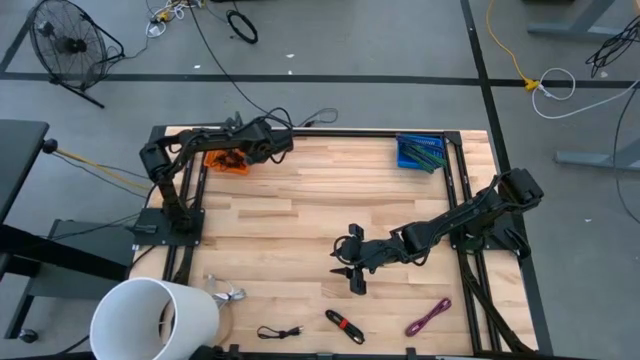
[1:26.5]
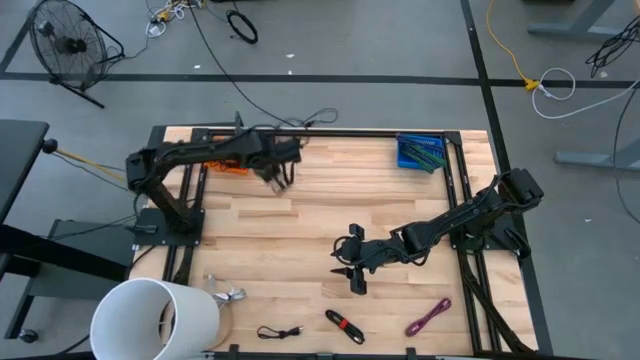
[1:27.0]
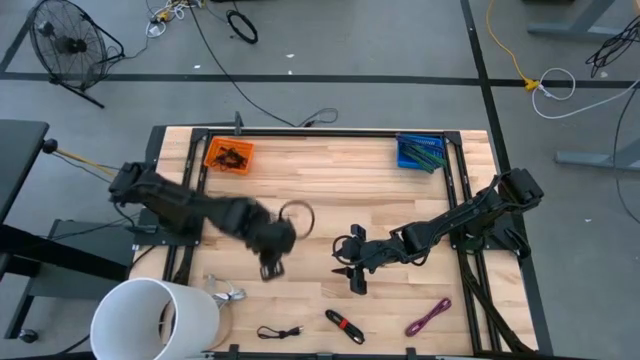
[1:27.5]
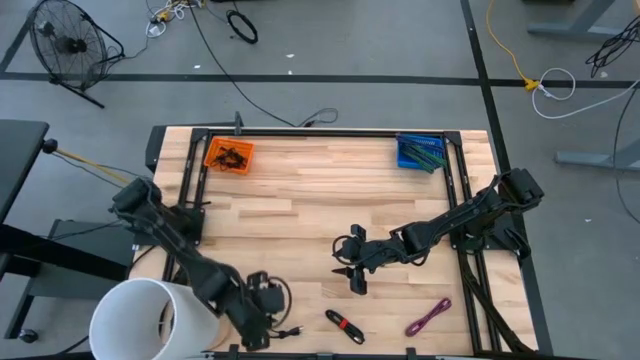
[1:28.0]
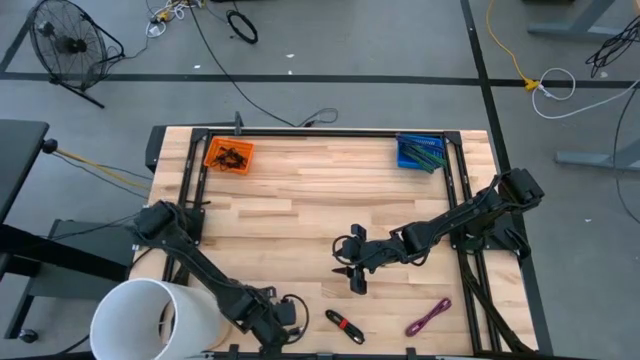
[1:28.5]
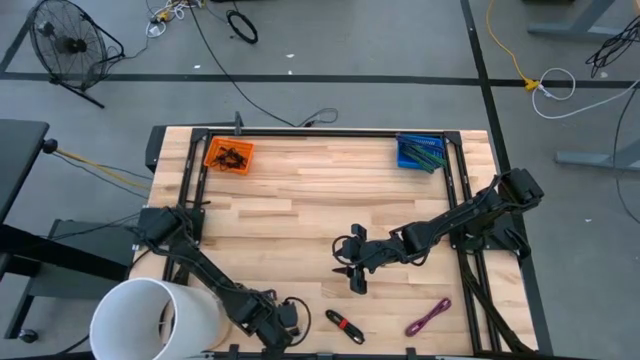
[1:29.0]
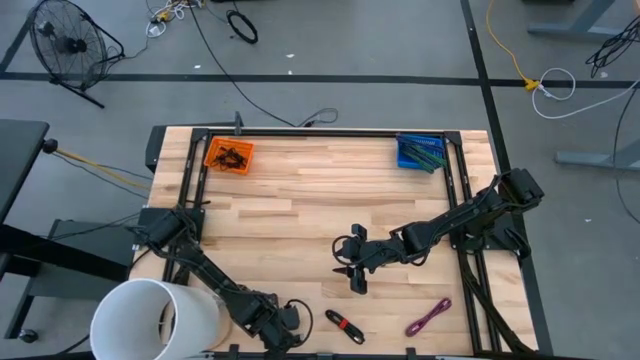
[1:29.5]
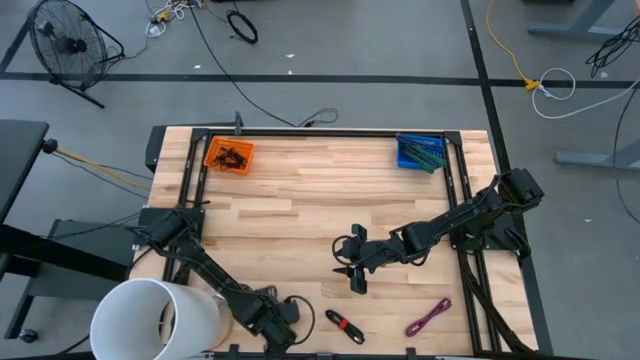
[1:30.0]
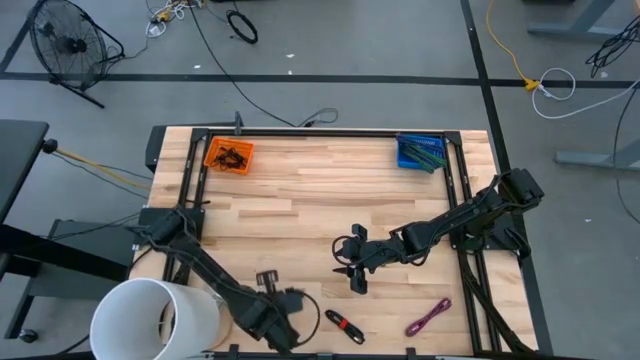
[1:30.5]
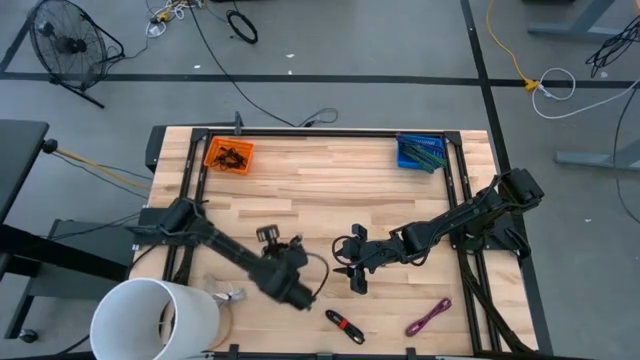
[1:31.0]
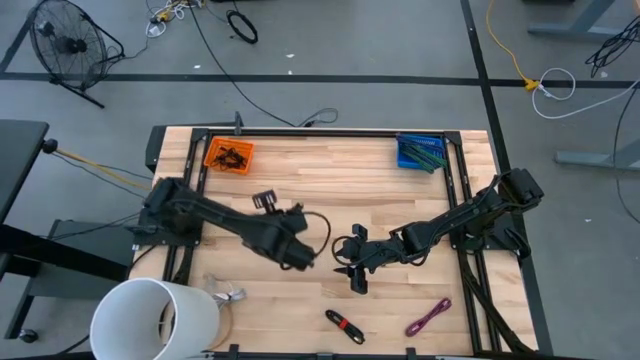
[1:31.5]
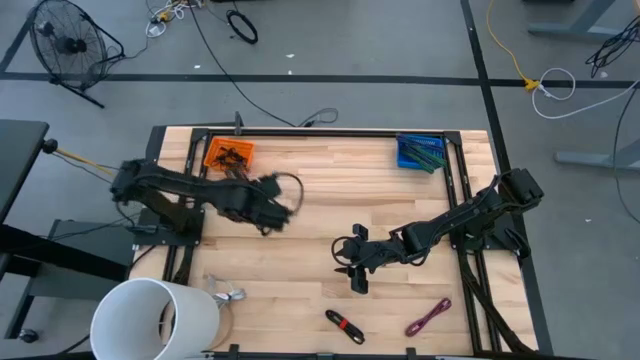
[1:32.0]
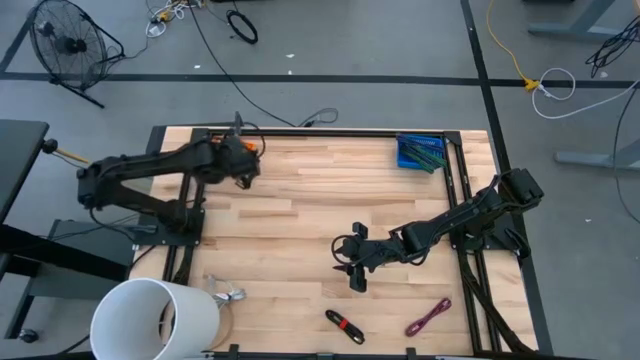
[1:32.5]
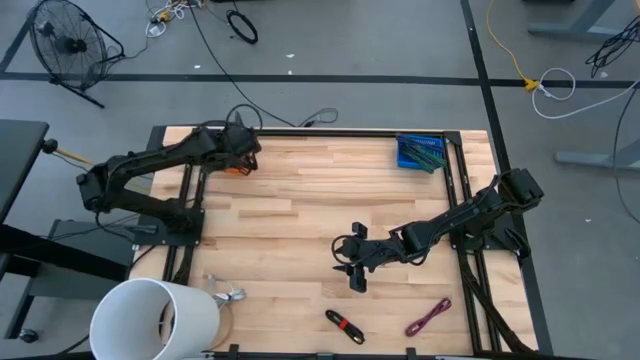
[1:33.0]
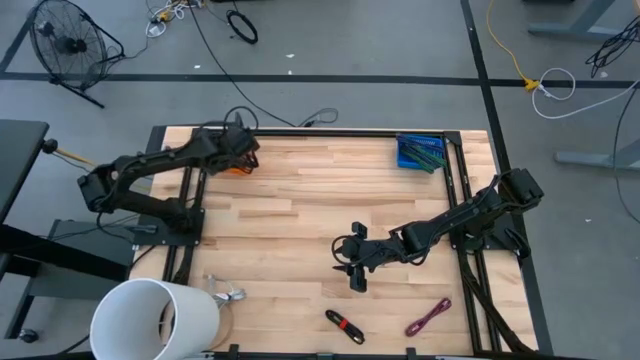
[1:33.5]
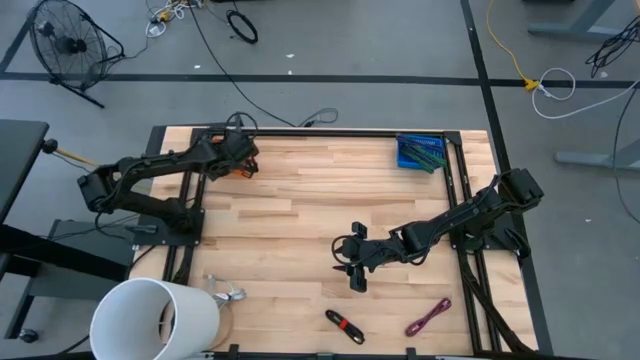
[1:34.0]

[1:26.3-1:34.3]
Task: Pick & Place USB Port
Put the black charger cable into the orange bin

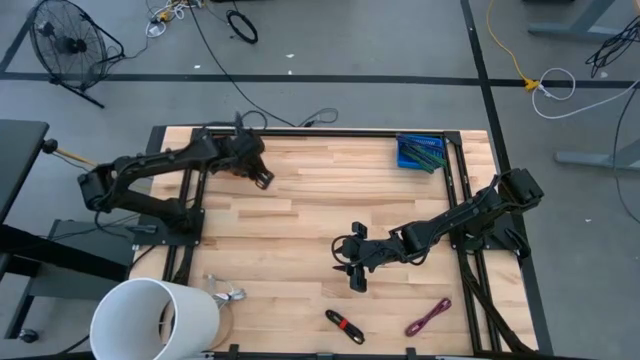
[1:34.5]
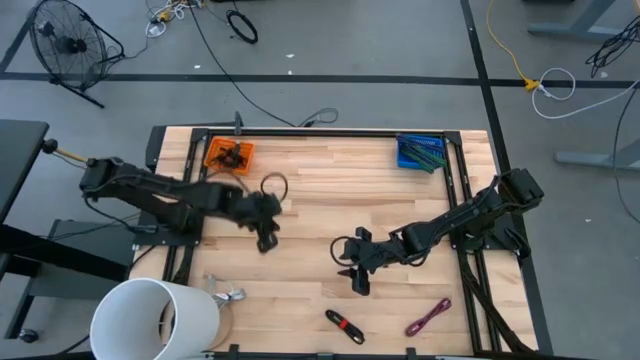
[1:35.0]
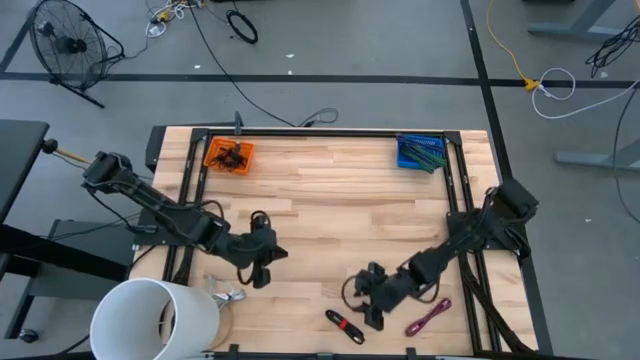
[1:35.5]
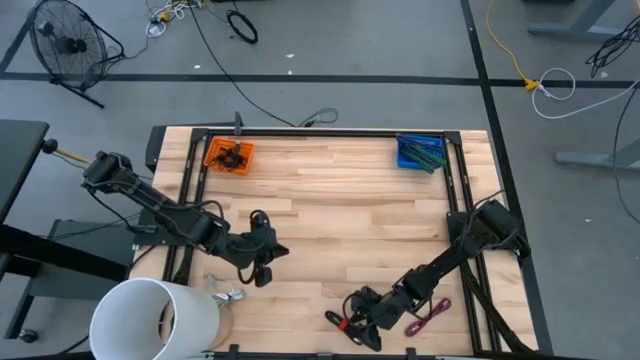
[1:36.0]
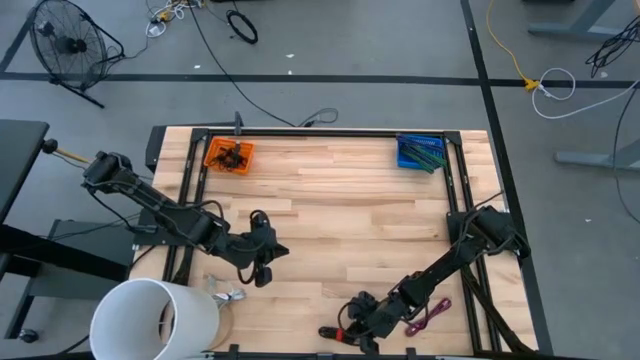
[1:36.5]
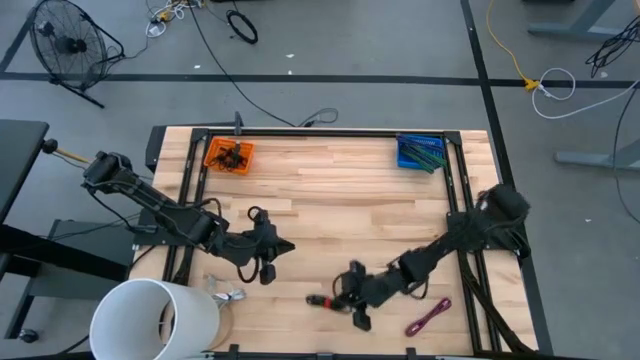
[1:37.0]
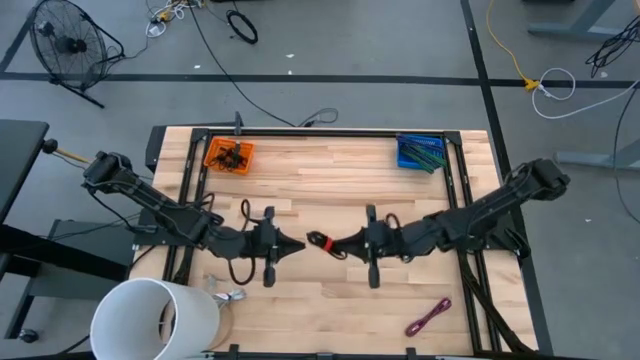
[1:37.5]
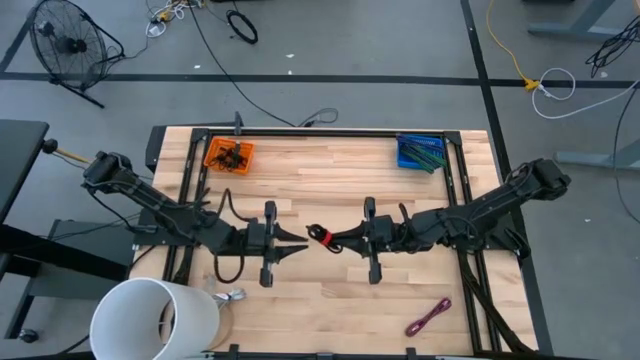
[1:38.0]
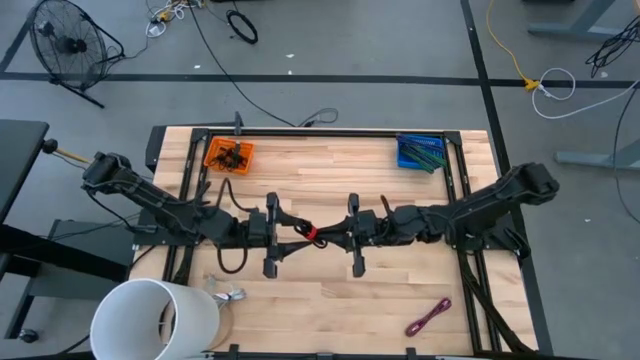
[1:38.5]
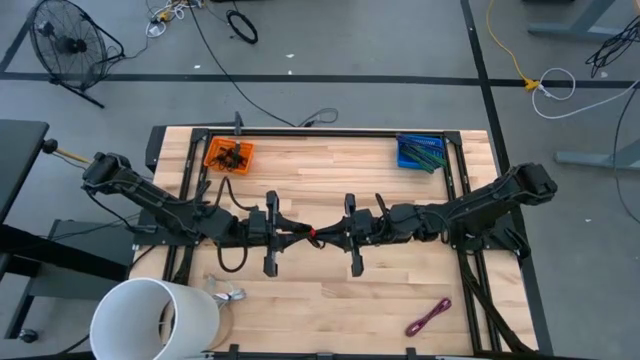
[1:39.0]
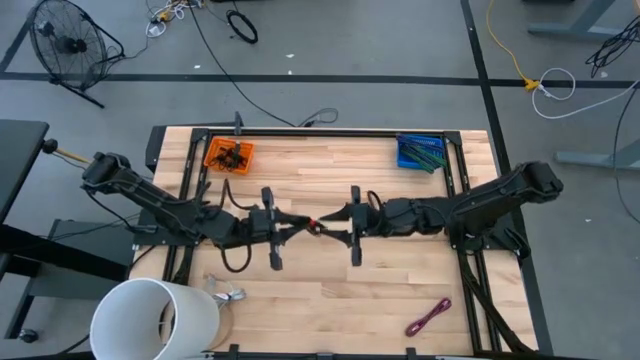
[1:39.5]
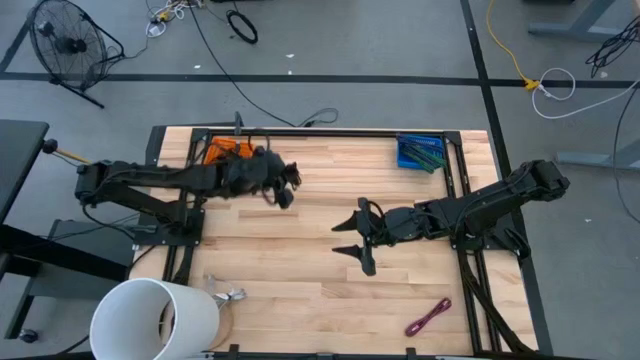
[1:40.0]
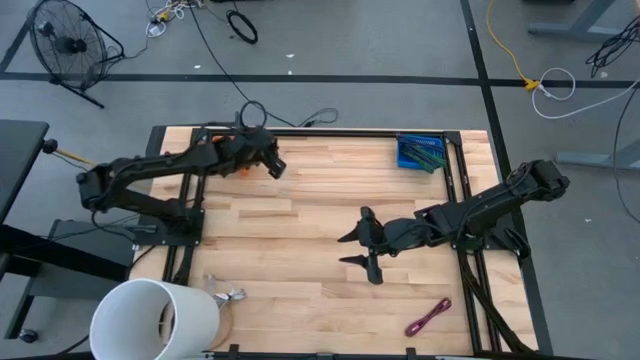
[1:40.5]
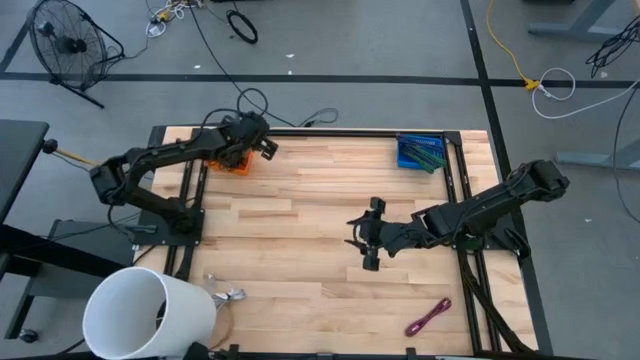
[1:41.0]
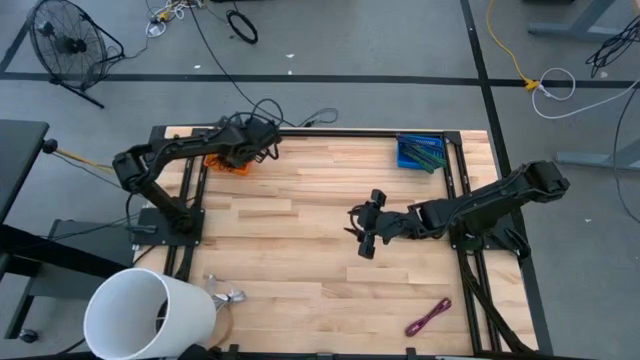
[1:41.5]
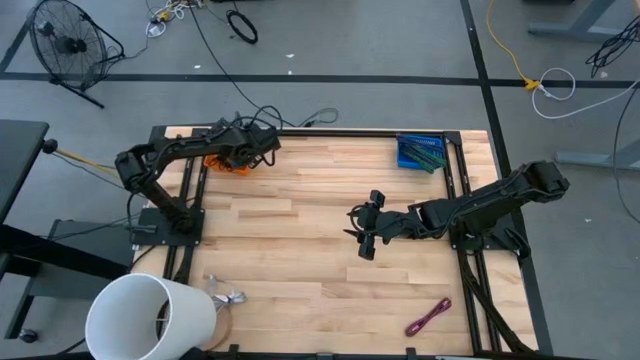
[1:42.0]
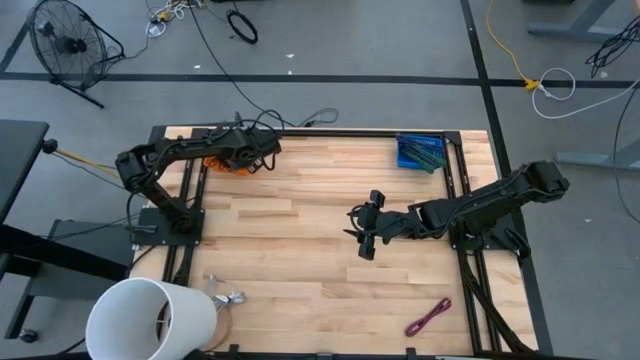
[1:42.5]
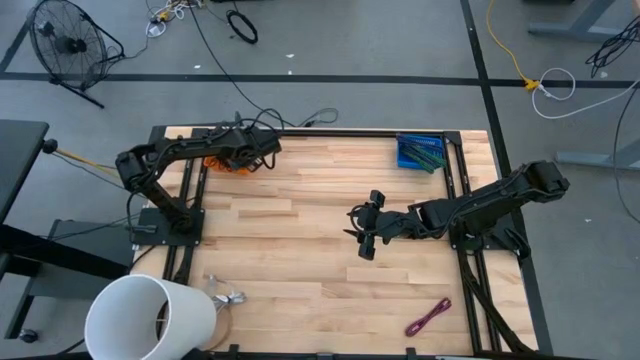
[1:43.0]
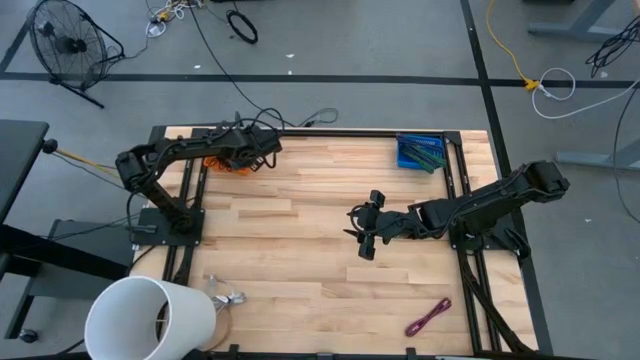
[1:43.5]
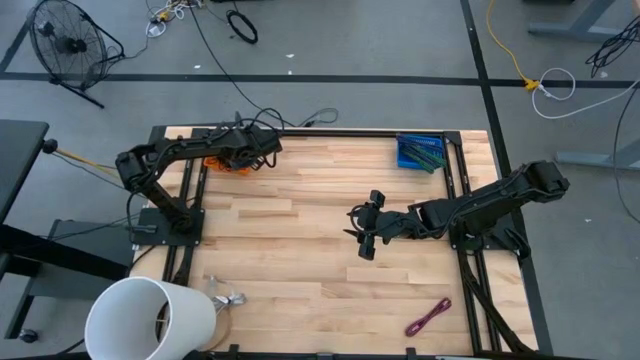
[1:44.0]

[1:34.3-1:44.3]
Put the black charger cable into the orange bin

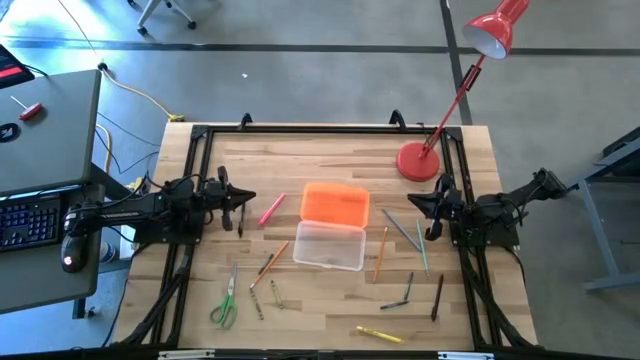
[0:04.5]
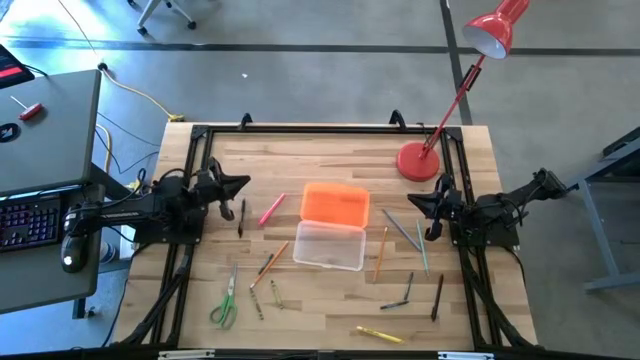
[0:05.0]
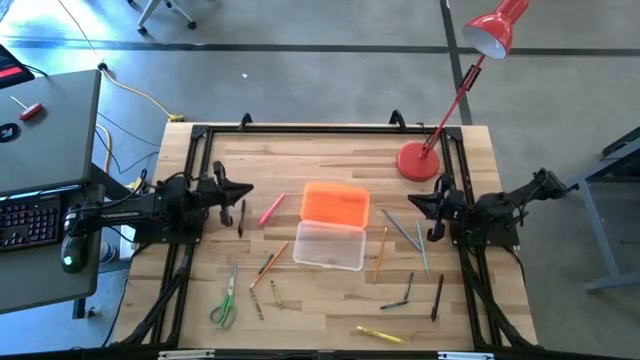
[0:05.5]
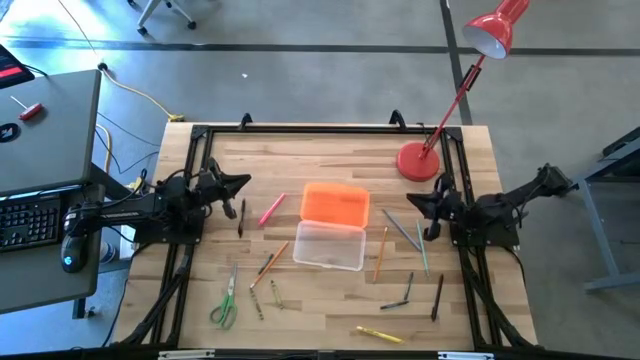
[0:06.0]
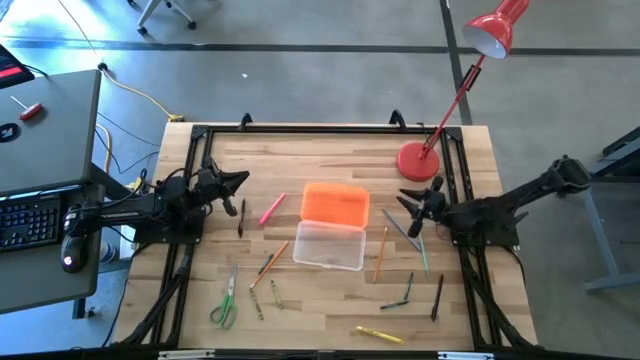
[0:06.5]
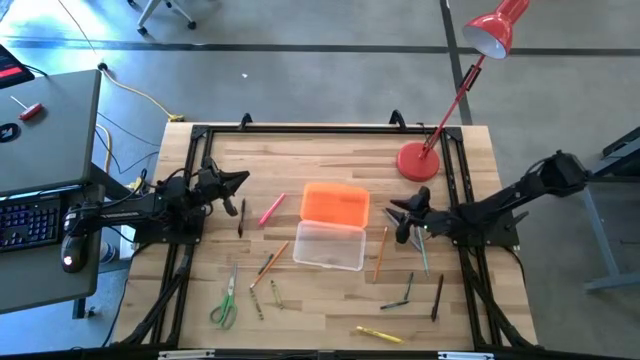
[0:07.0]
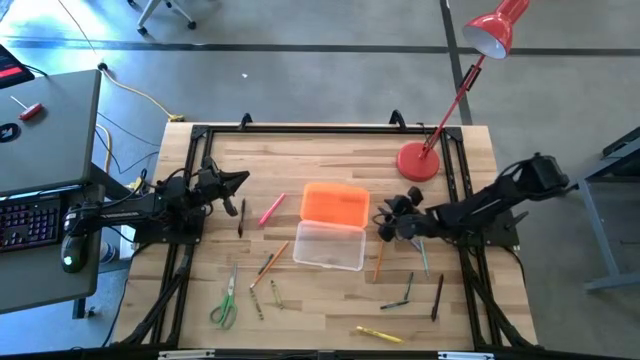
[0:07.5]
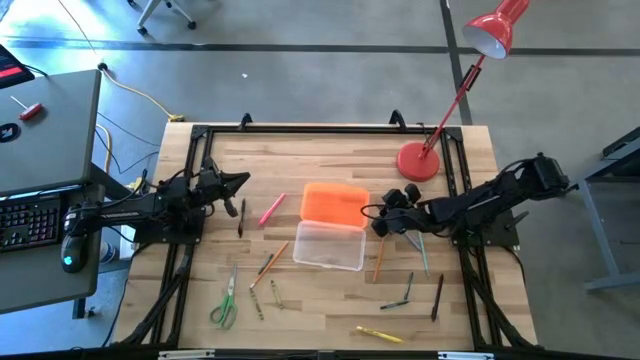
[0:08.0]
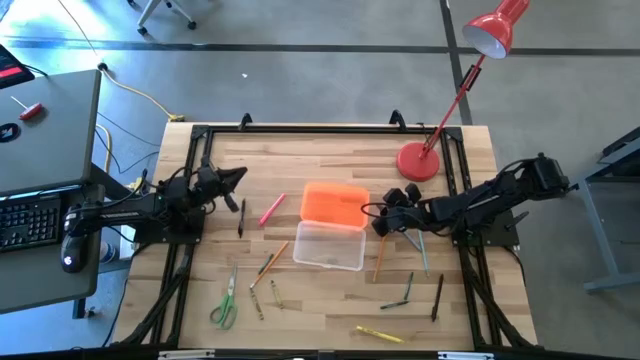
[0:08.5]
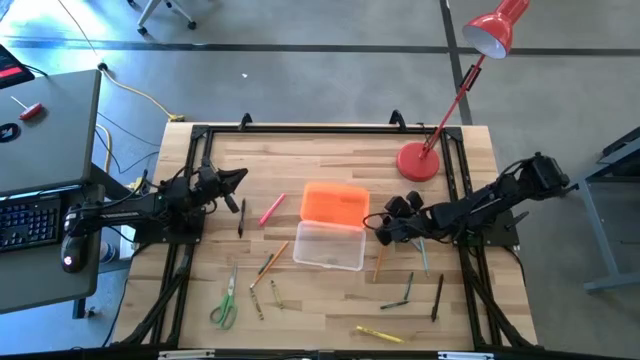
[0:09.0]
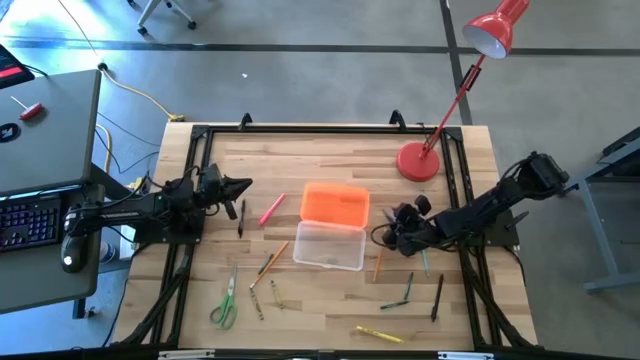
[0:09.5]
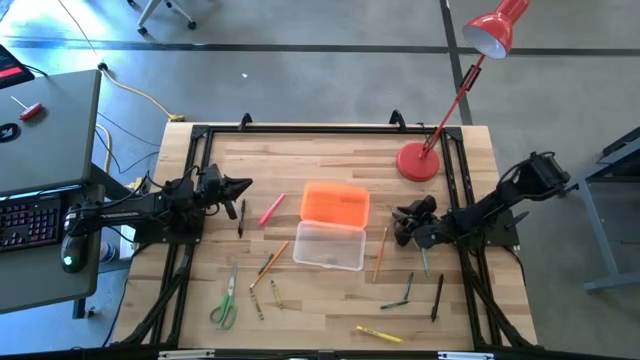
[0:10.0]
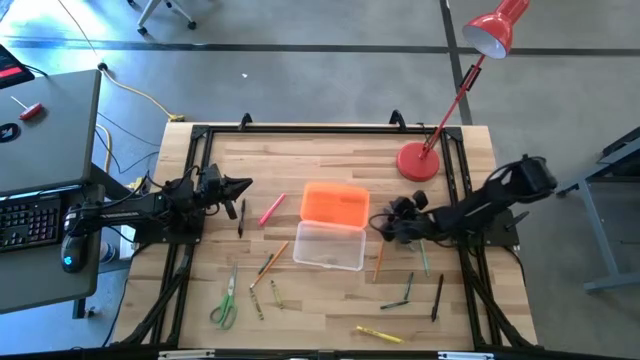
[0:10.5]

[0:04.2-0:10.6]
Task: Pick & place school supplies into a supply box
Put the blue pencil into the supply box
